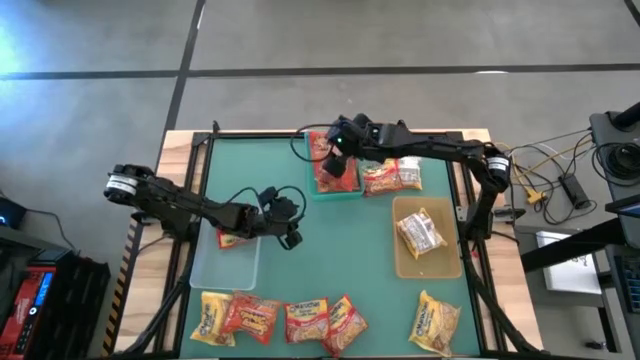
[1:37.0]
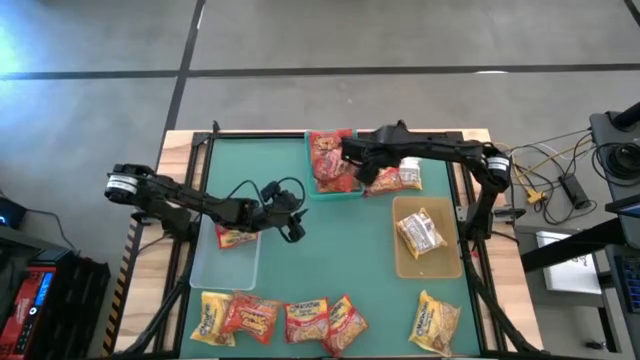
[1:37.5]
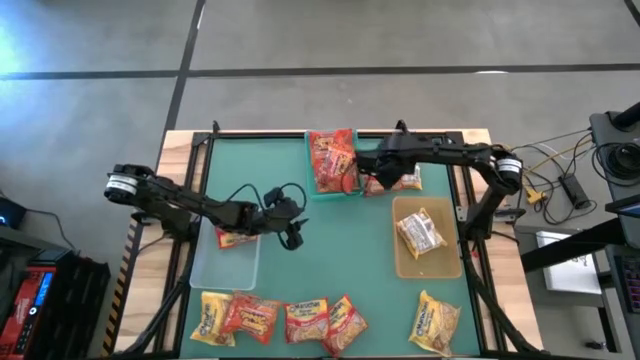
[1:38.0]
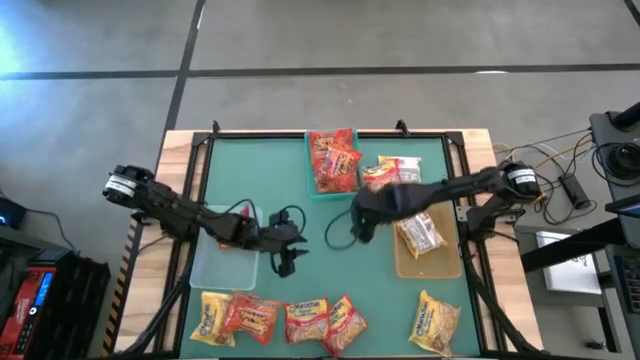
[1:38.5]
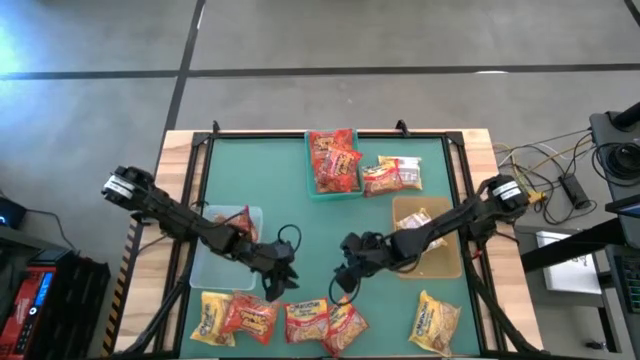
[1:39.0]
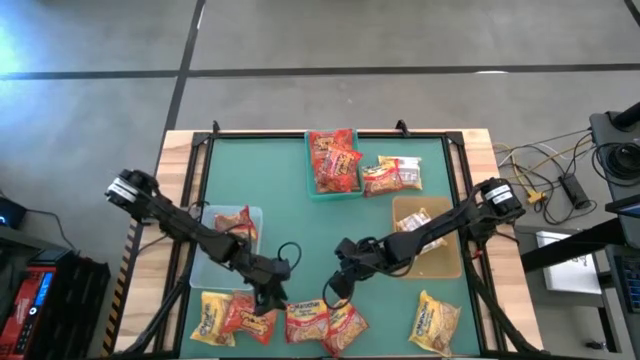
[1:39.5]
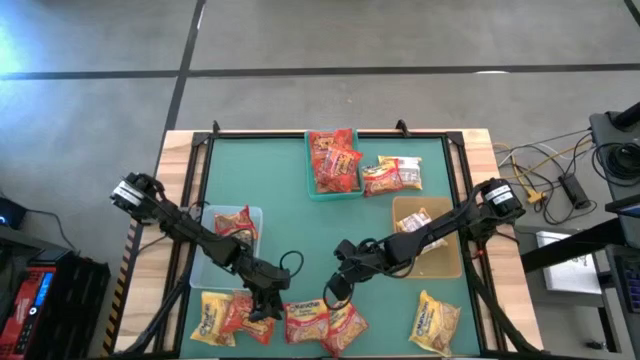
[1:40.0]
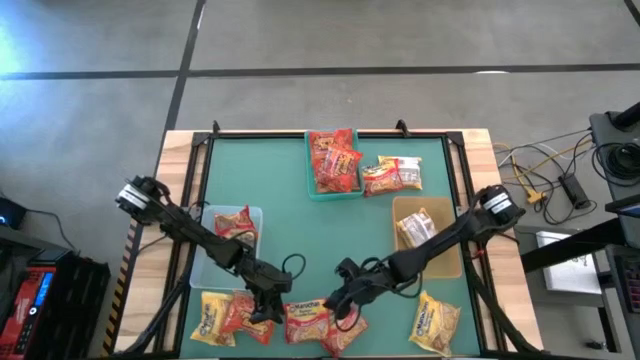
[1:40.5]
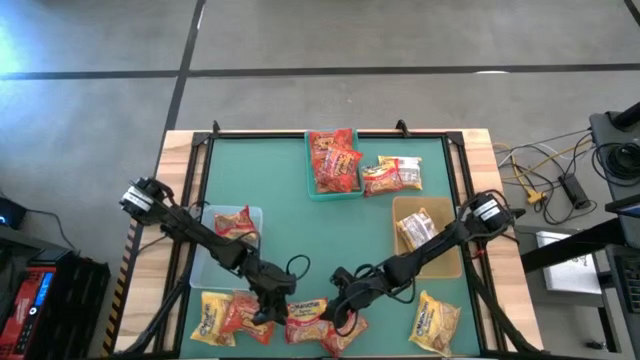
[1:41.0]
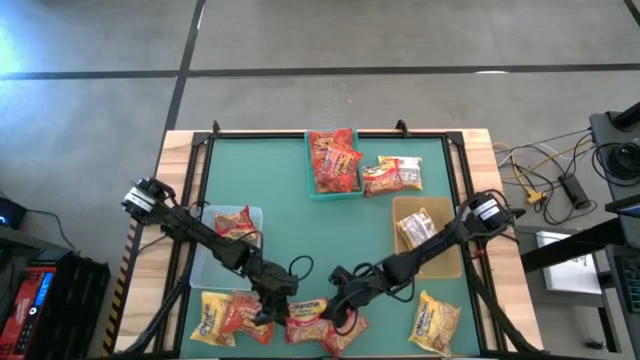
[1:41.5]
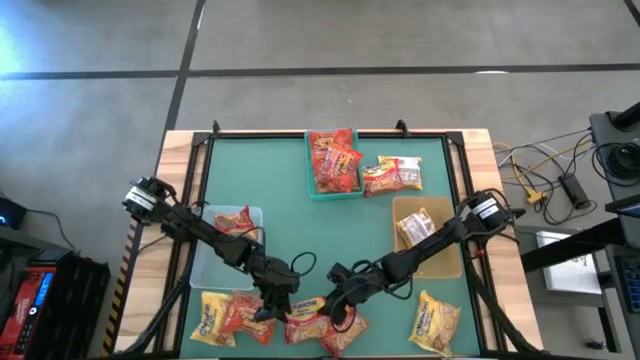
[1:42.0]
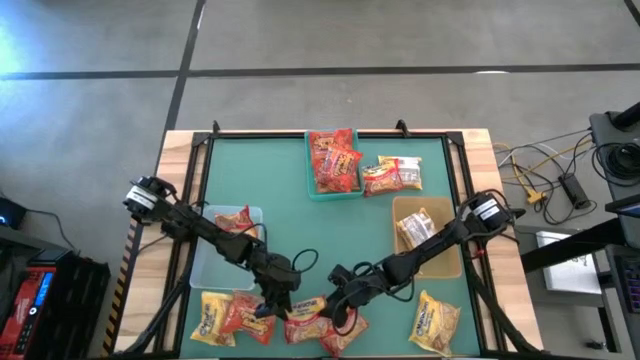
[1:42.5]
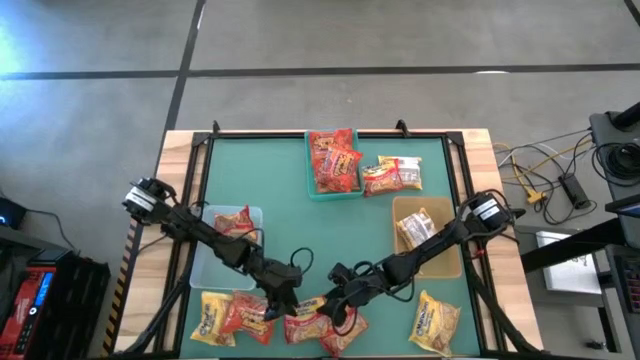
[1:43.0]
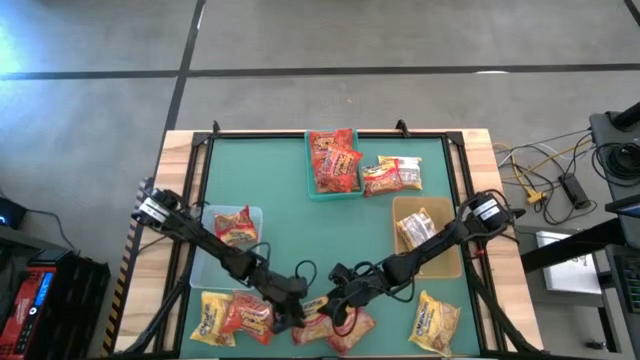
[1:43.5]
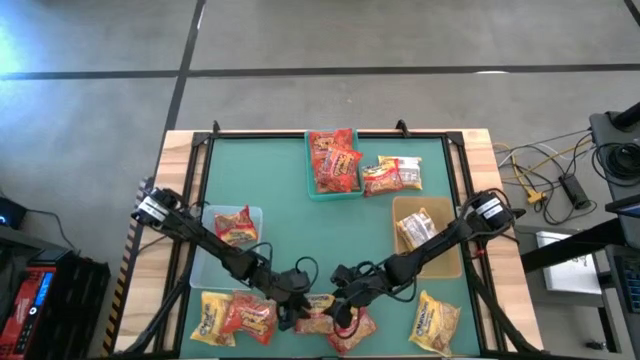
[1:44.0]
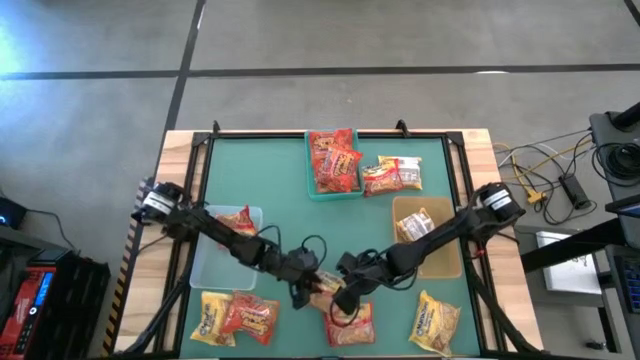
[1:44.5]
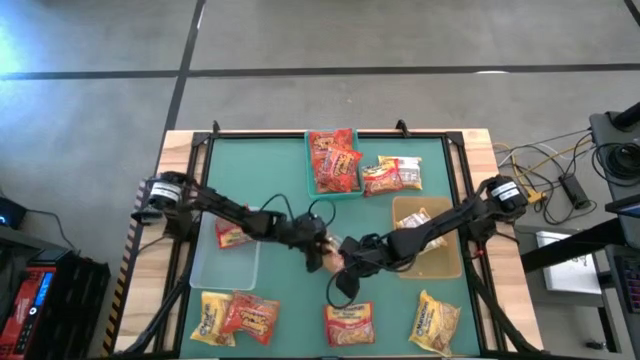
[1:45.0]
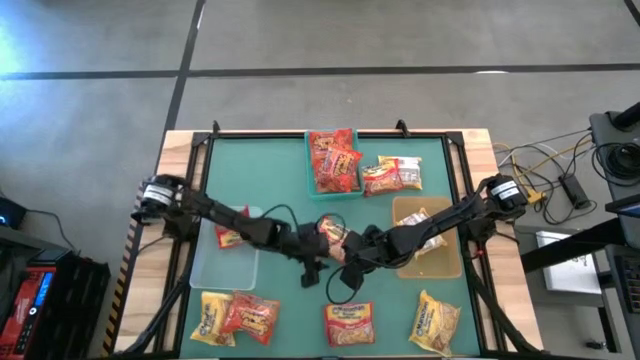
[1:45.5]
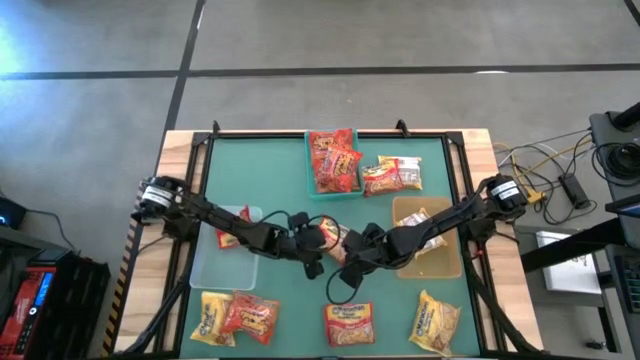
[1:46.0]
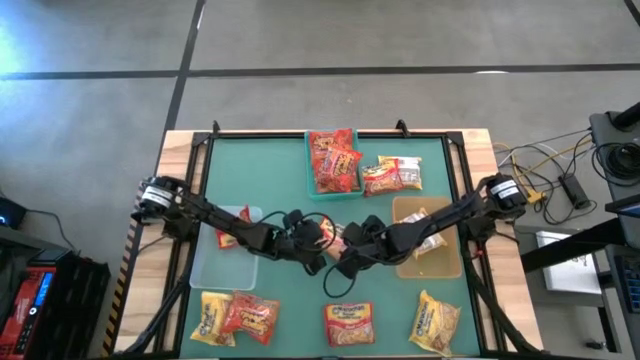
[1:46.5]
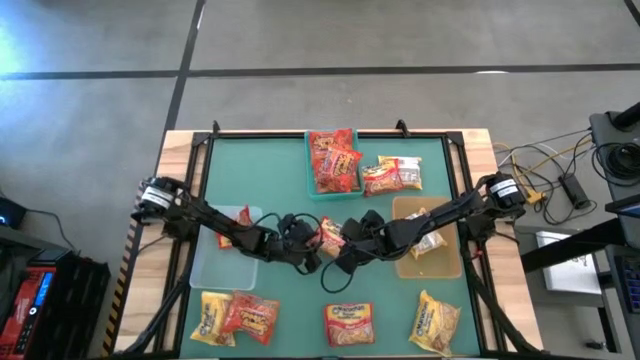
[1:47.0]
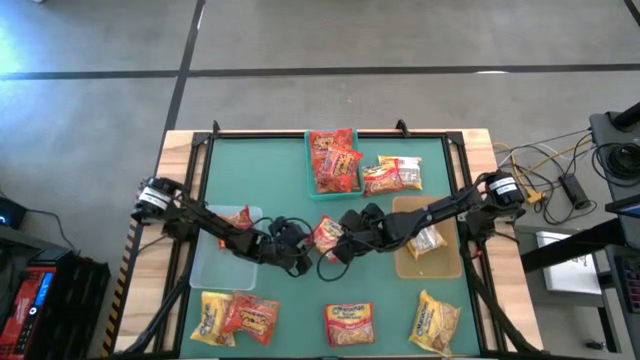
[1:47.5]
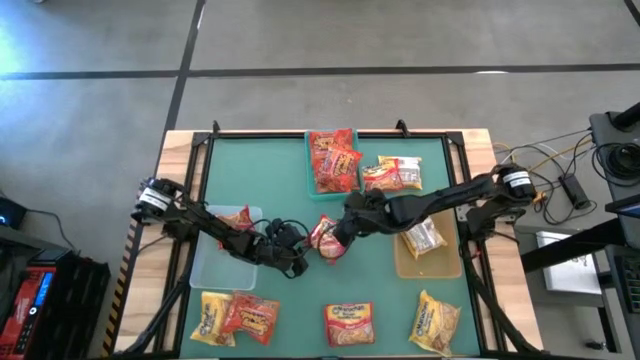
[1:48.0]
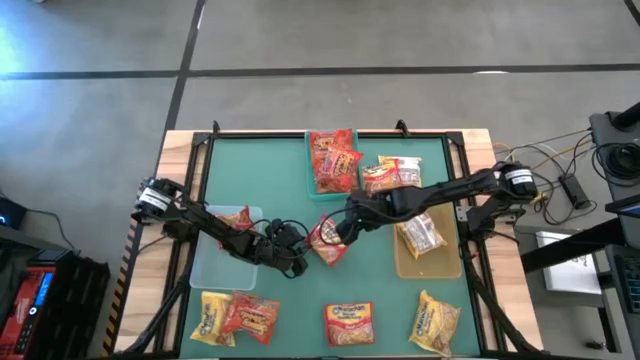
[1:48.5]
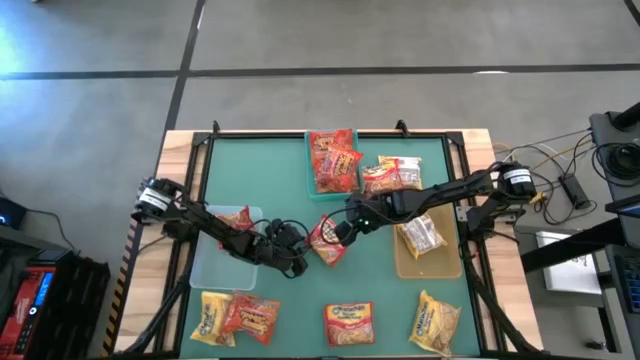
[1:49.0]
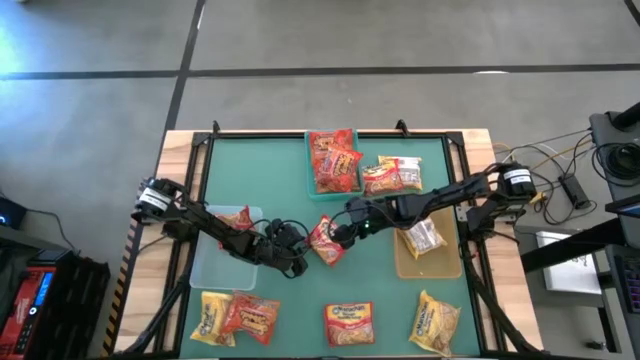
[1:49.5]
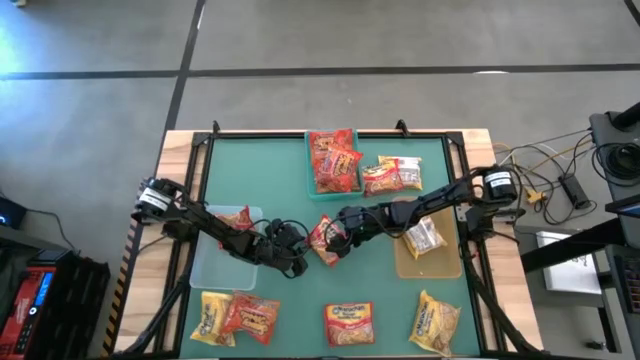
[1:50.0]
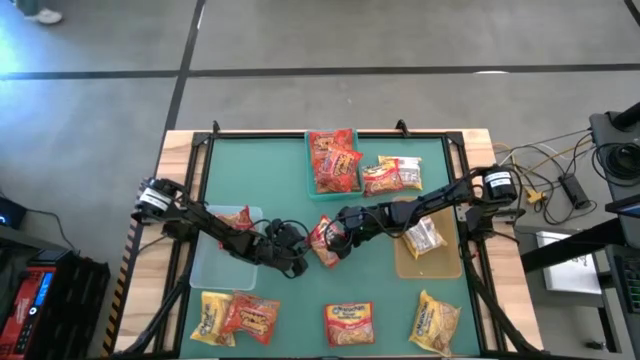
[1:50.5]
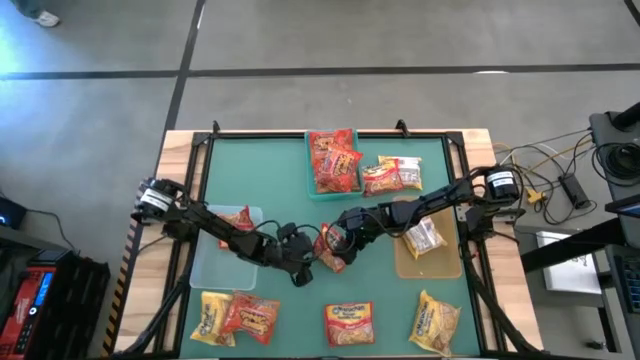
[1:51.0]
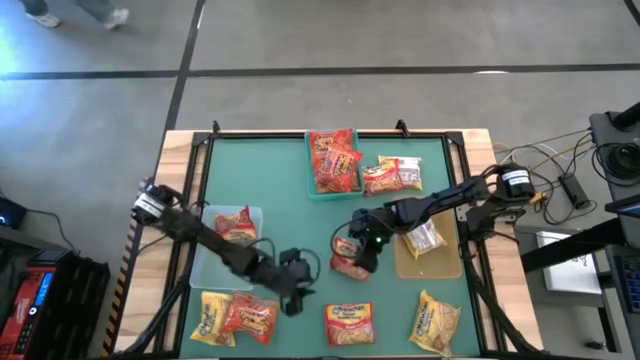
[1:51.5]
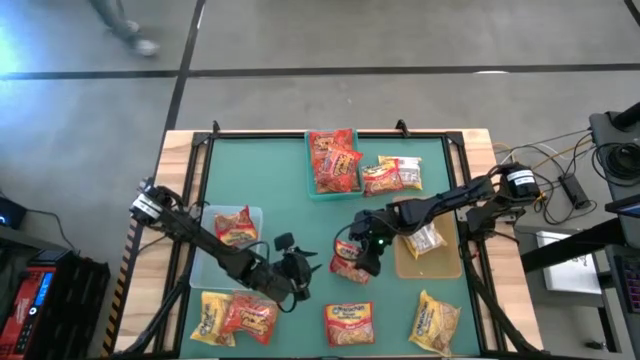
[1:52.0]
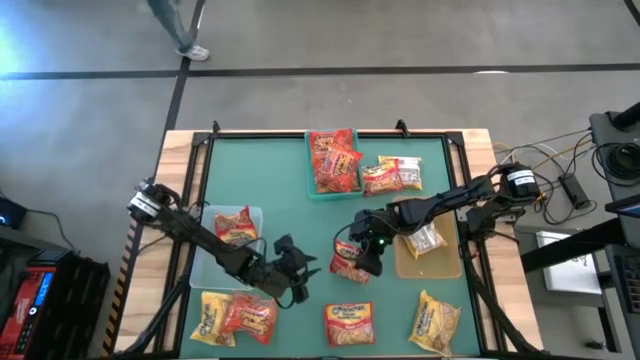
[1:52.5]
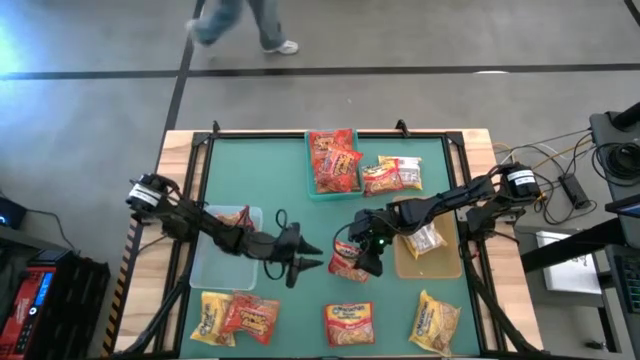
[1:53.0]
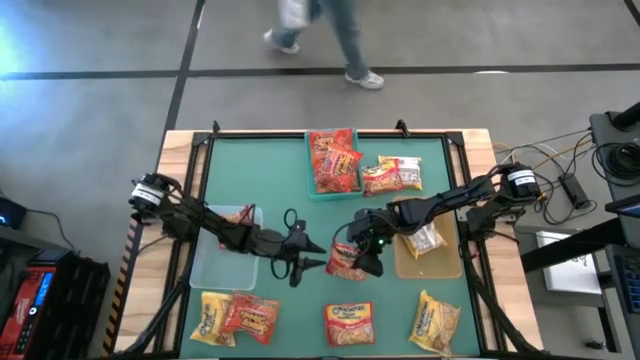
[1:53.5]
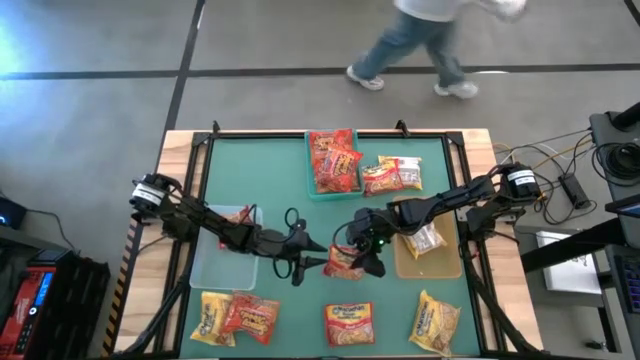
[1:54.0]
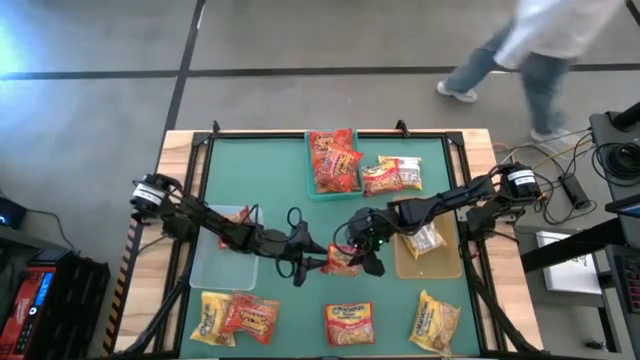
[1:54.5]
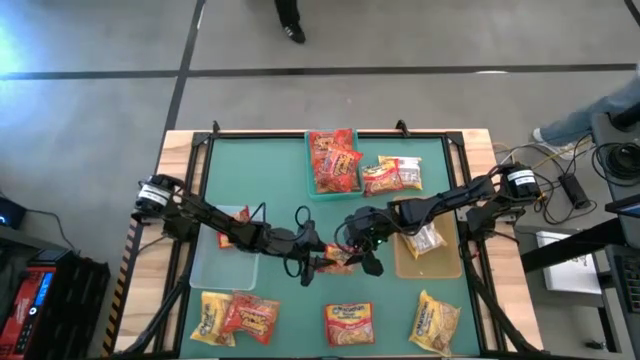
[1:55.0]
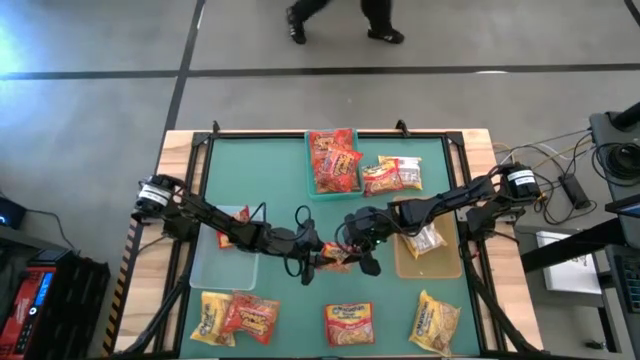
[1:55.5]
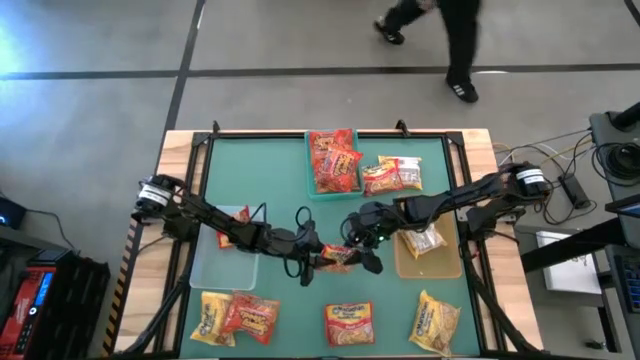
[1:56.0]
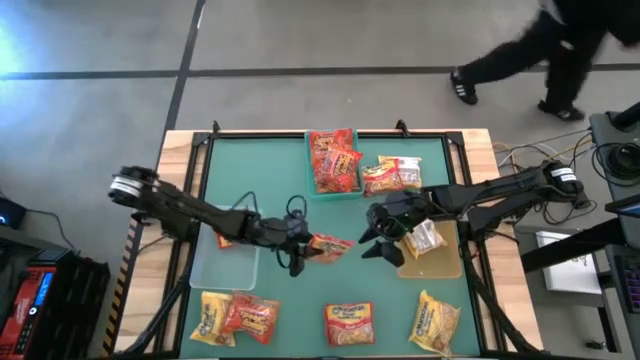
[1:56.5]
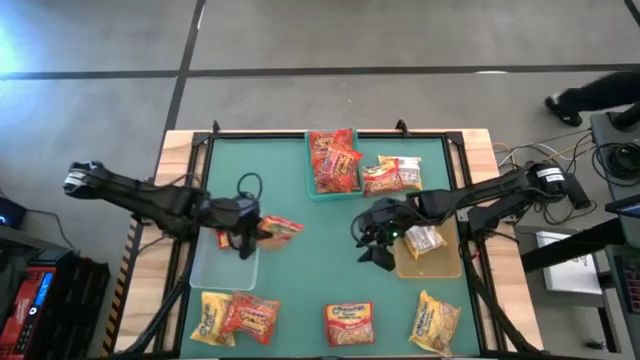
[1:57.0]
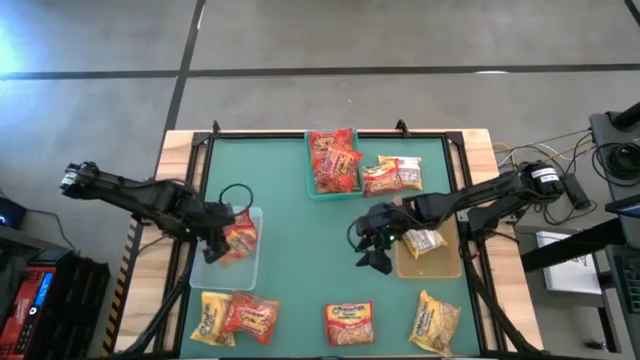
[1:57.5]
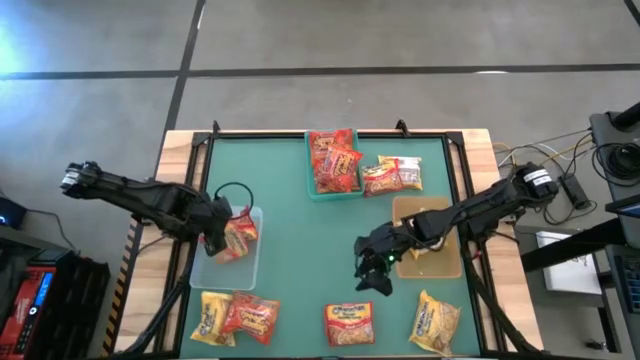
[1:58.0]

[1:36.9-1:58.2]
Task: Sort Maruchan noodles
Put the red noodle pack into the white transparent bin
